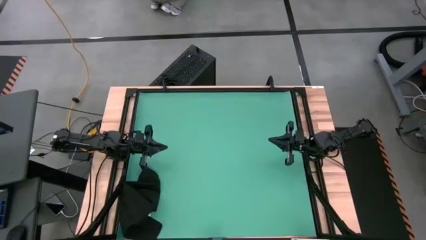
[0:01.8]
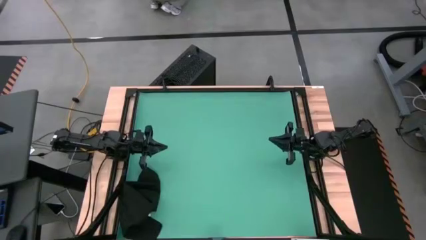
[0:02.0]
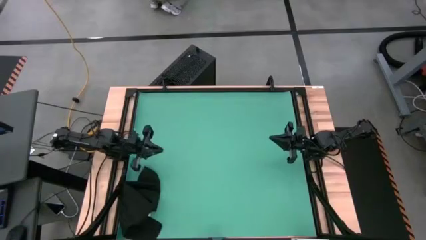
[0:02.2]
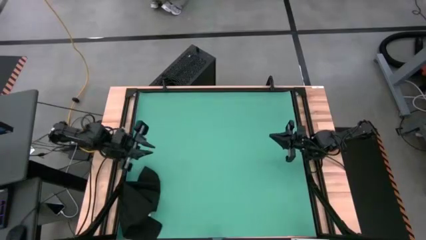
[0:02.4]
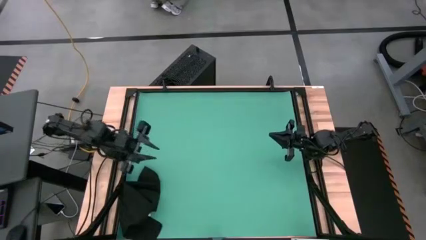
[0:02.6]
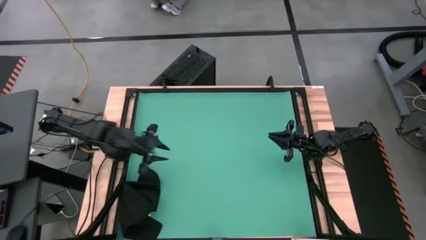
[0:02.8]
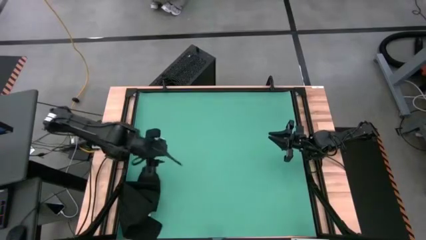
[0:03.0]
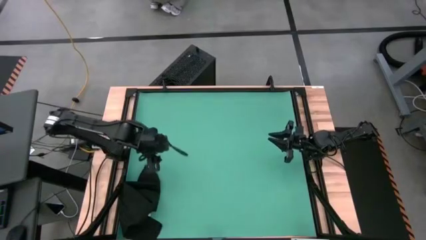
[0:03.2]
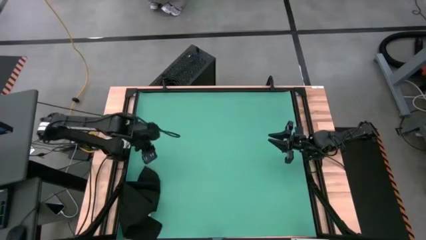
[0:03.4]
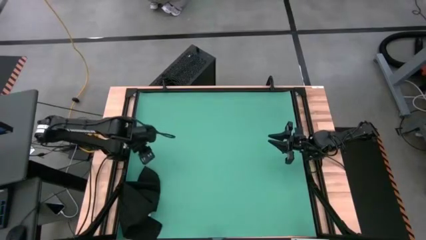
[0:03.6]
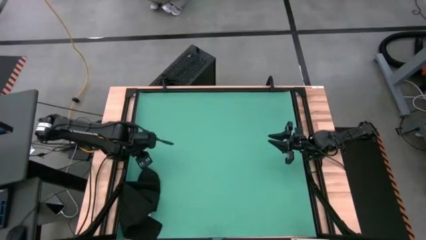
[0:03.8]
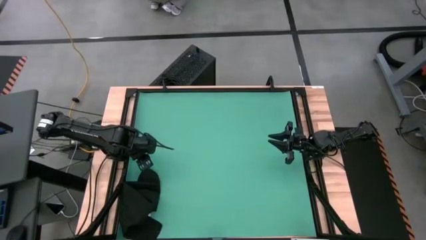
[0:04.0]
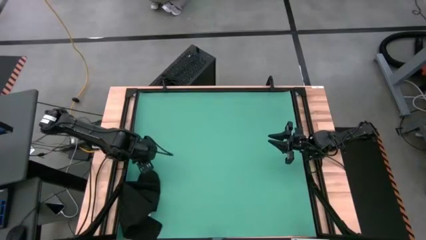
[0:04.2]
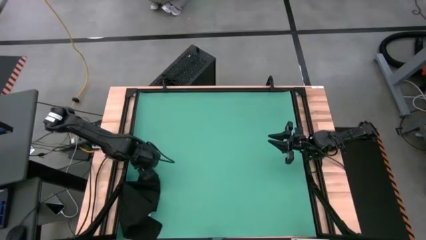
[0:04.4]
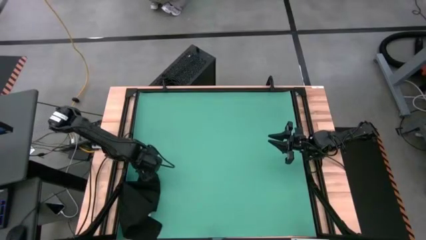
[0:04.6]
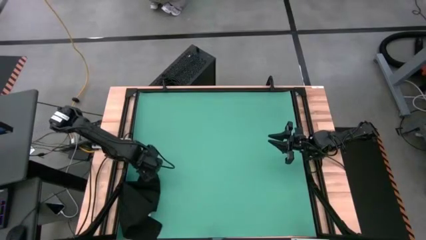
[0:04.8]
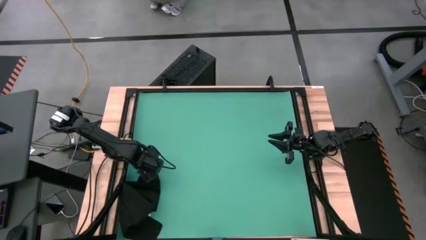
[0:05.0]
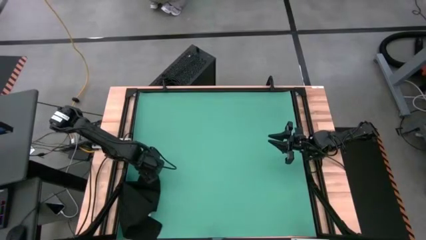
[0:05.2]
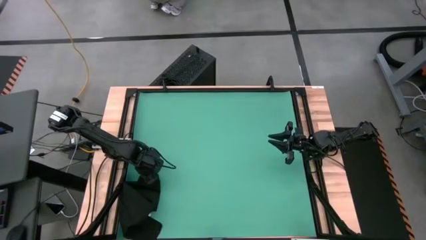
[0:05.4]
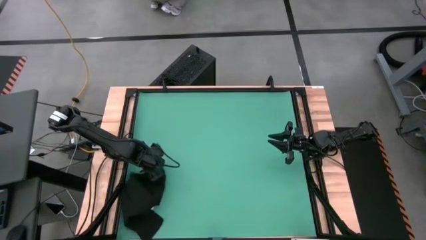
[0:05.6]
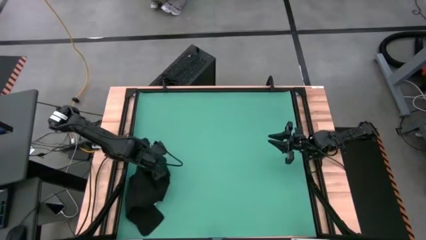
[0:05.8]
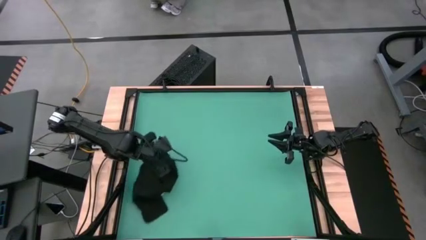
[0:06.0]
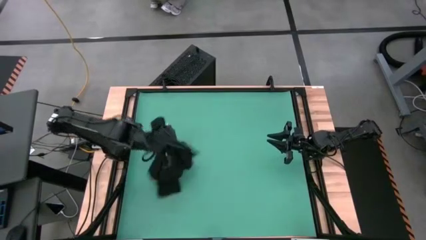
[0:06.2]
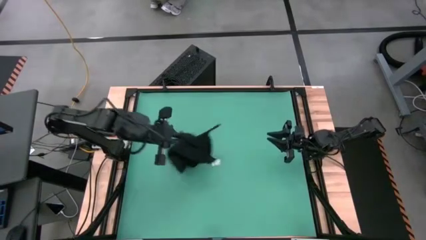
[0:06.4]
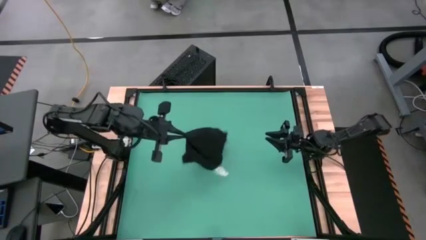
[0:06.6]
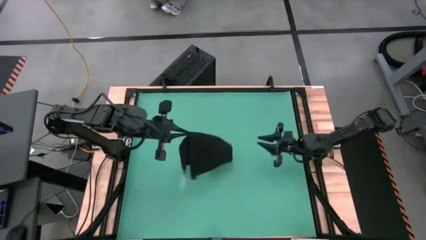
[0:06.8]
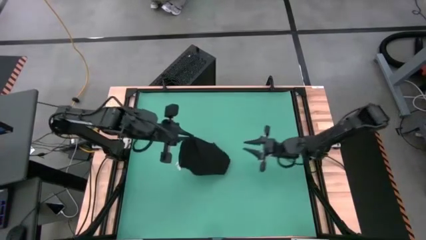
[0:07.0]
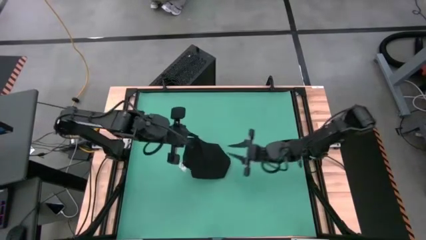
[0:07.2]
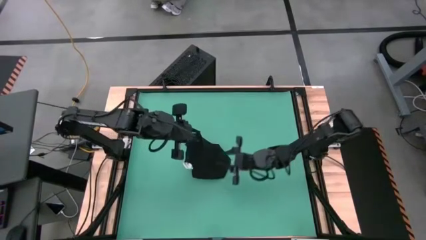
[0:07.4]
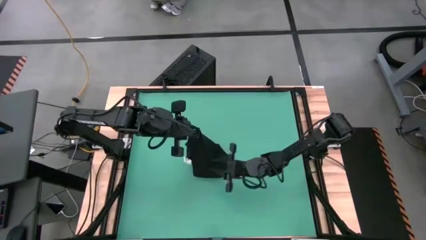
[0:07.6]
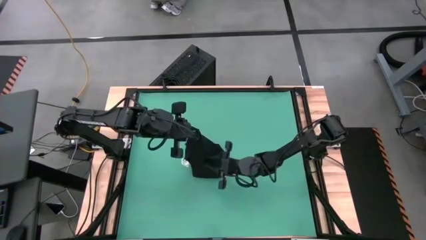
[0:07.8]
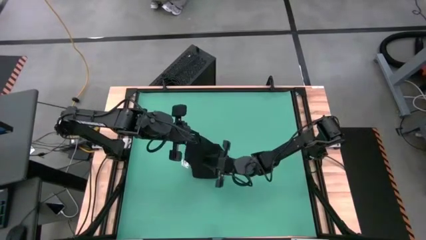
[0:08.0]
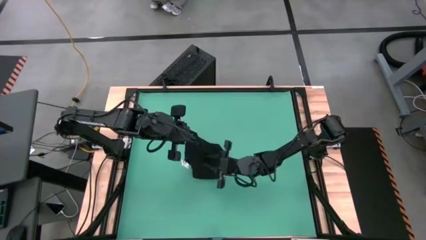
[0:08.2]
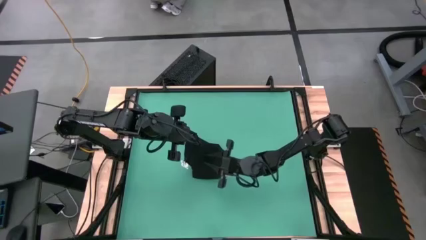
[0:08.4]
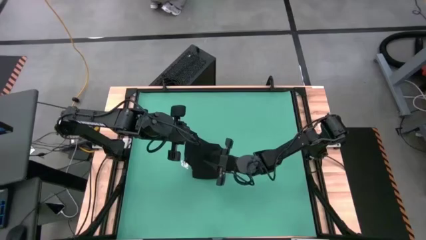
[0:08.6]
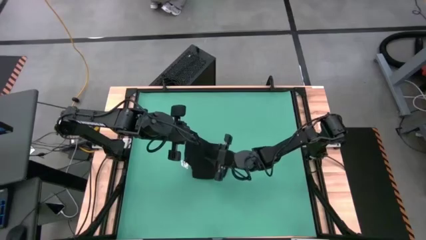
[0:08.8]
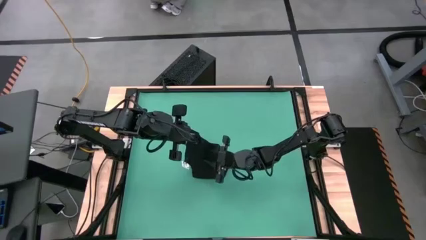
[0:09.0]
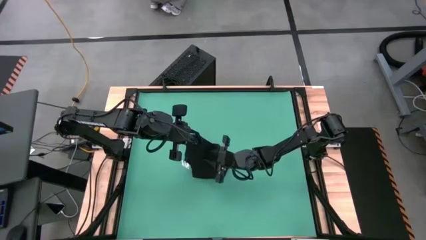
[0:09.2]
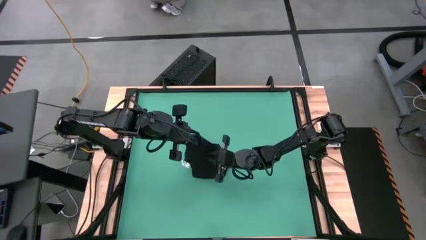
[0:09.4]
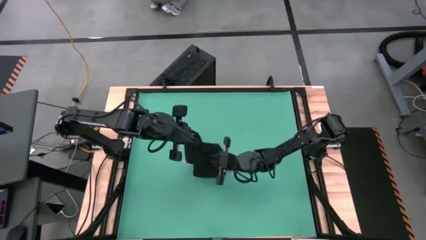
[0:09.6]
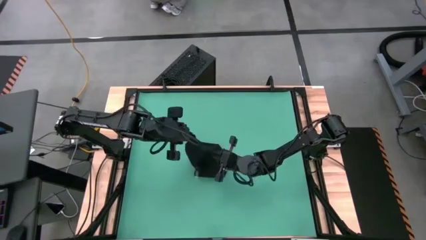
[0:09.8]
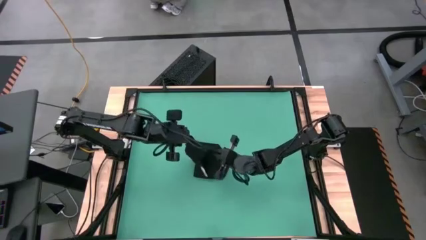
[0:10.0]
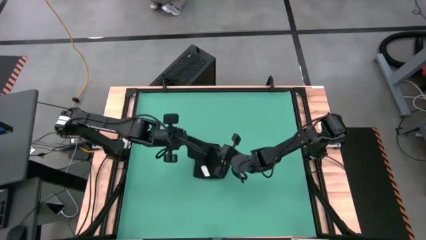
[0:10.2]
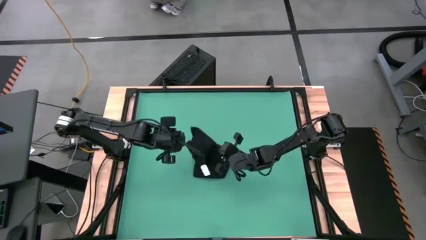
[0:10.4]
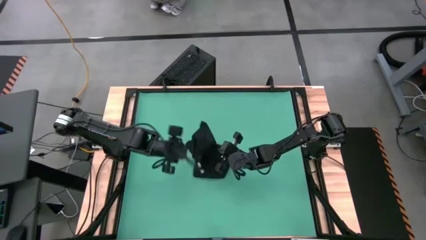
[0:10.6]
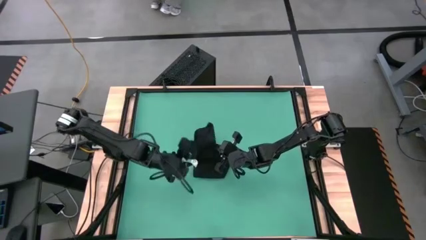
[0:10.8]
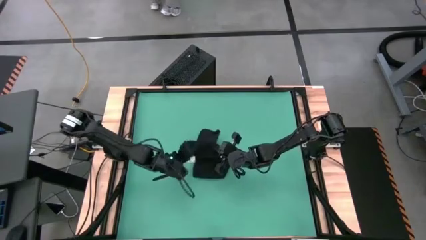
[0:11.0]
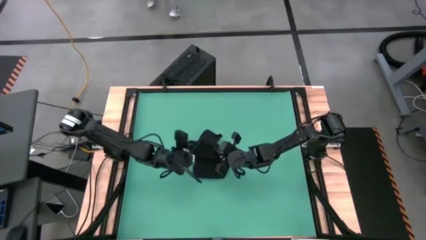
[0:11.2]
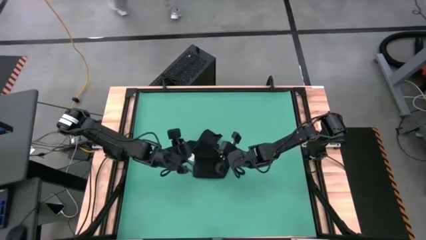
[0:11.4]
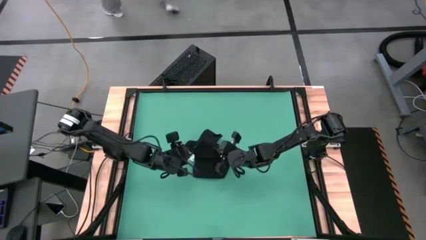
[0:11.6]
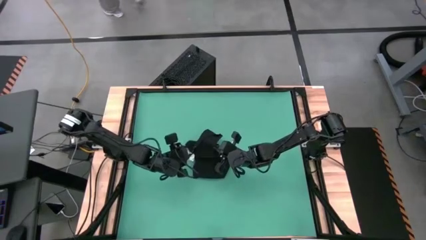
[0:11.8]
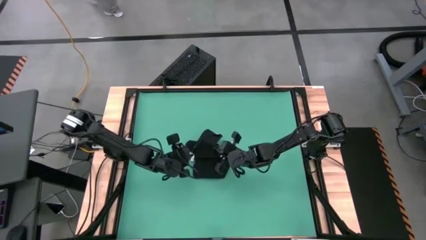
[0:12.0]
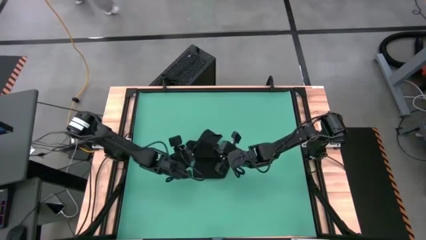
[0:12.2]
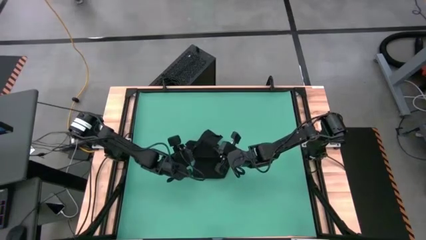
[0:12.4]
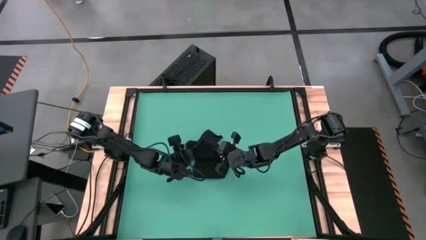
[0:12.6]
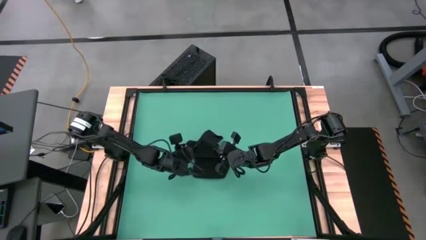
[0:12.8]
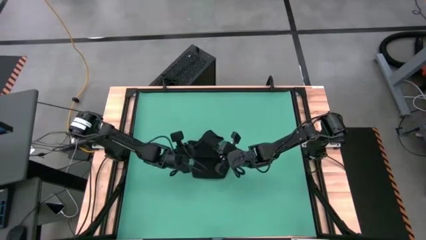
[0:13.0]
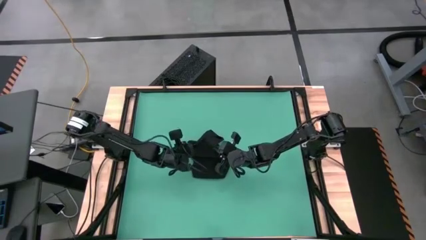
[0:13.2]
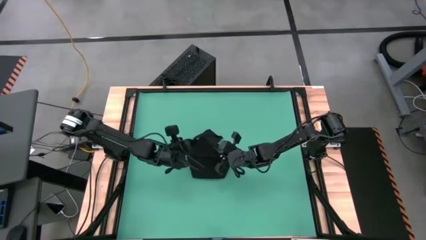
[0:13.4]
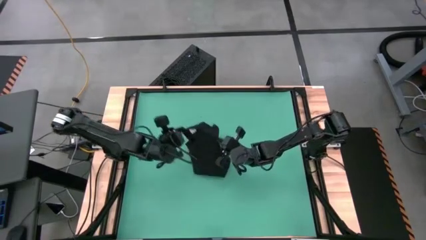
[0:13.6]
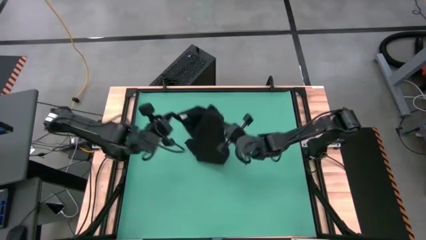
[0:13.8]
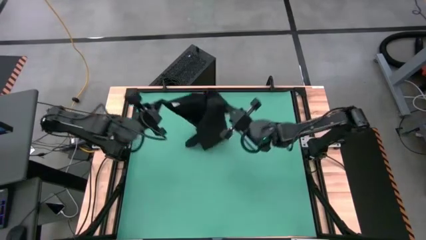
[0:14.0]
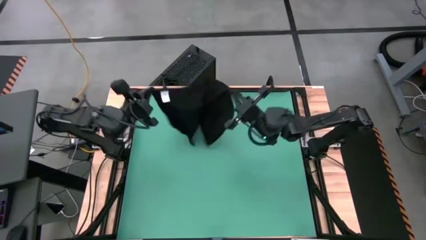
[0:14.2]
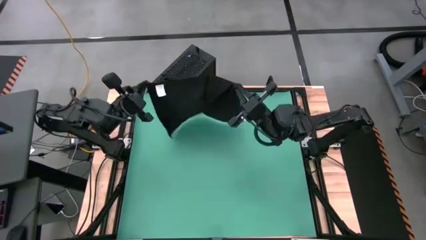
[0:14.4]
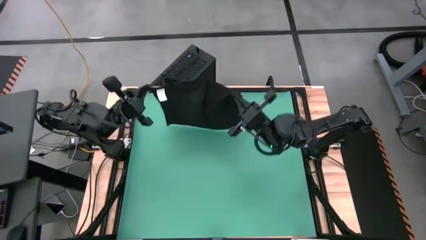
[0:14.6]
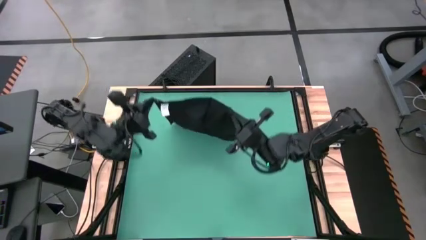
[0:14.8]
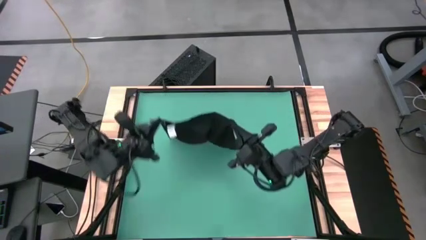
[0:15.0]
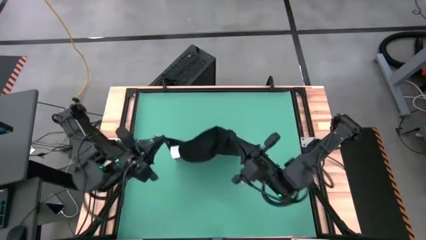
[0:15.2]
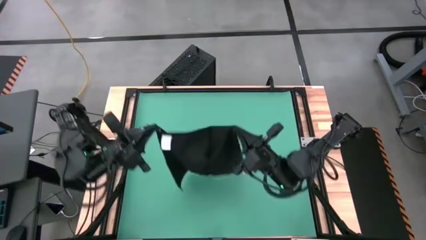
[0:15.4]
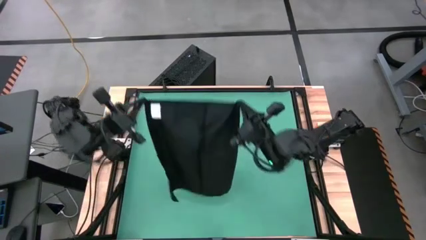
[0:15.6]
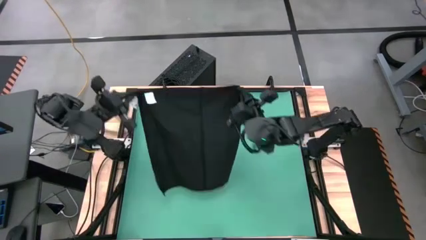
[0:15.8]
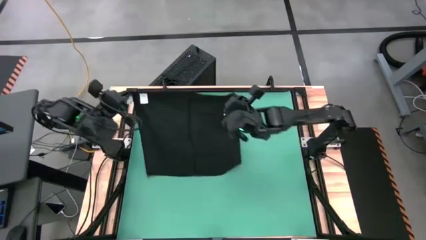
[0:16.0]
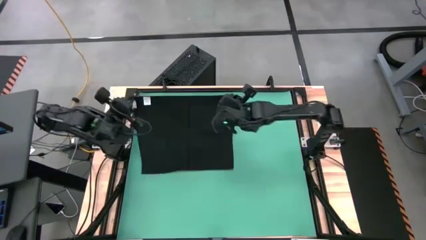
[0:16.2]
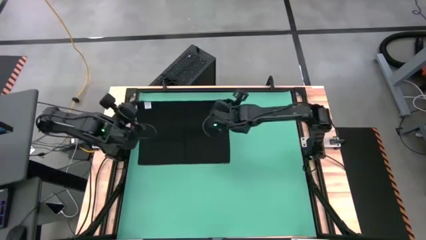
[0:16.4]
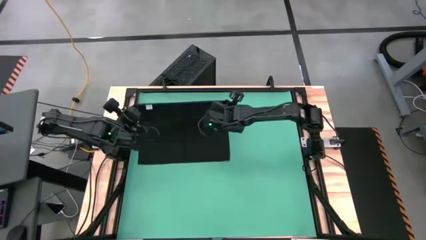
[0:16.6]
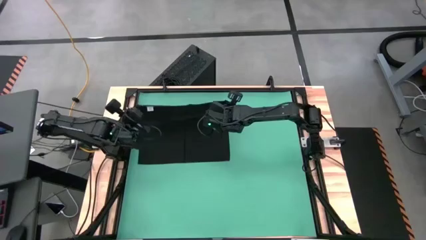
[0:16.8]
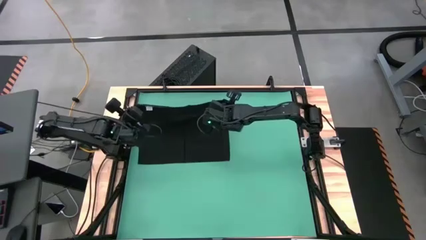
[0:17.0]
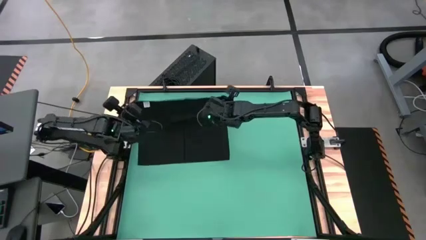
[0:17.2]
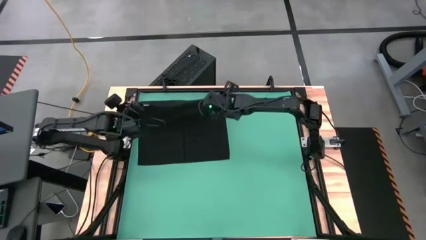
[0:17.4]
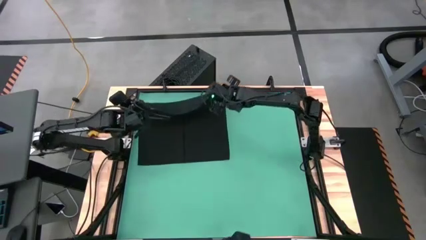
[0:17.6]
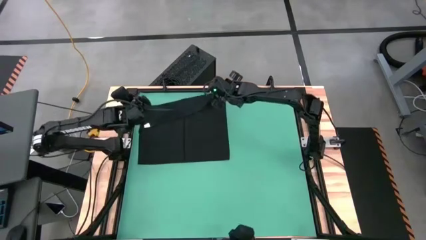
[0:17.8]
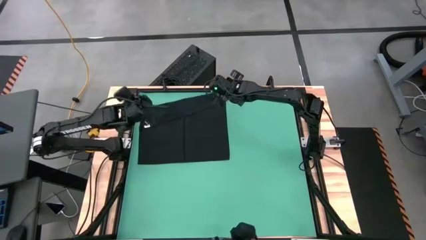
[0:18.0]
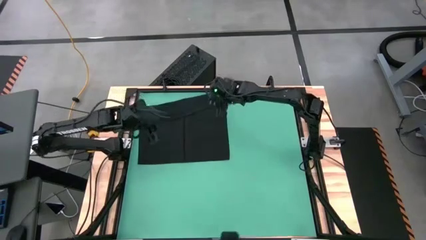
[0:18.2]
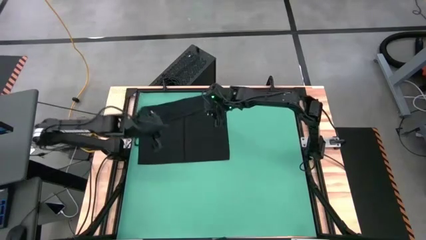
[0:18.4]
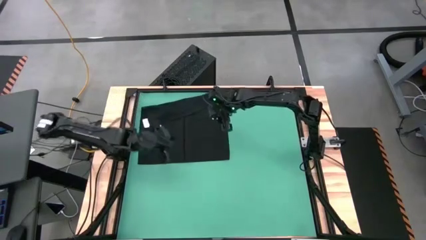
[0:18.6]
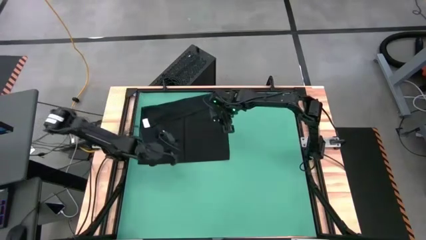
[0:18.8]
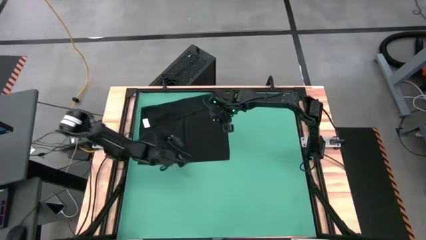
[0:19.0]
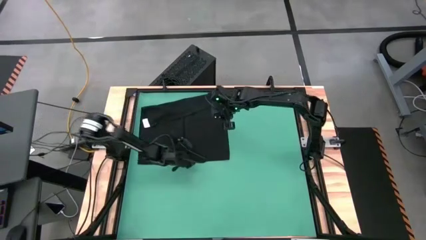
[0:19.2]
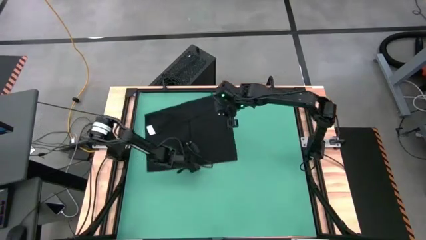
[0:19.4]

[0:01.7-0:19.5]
Task: Roll towel
Roll the black towel
